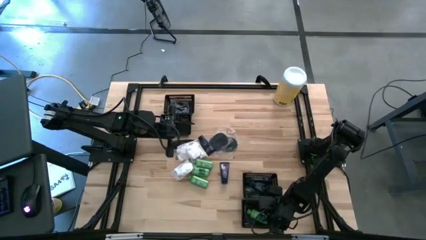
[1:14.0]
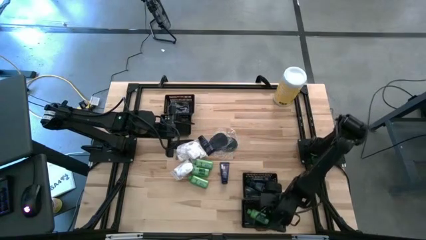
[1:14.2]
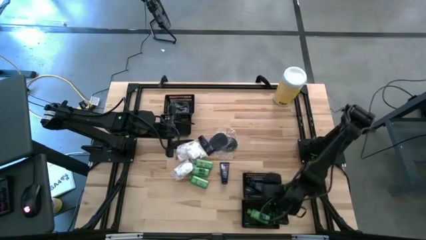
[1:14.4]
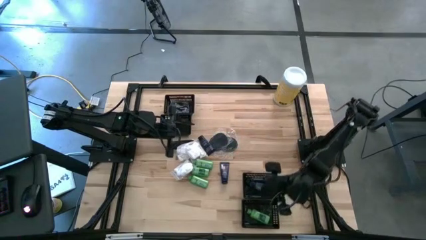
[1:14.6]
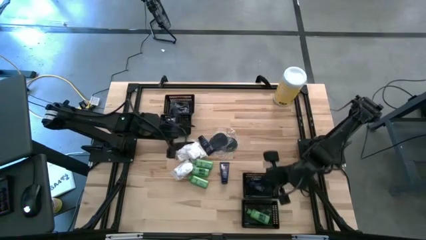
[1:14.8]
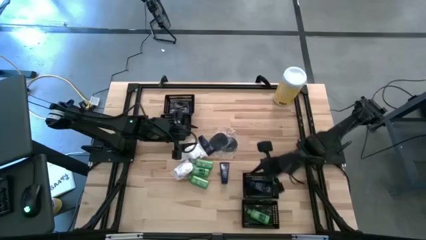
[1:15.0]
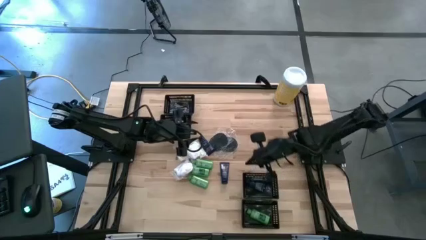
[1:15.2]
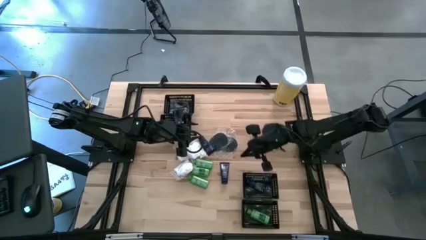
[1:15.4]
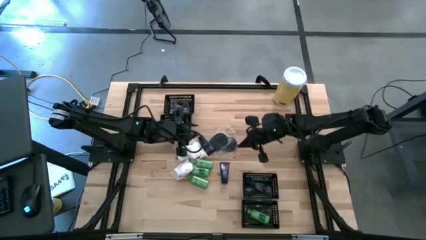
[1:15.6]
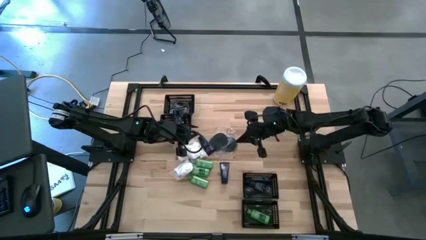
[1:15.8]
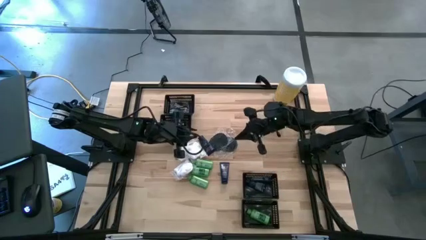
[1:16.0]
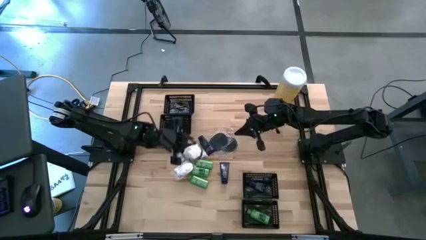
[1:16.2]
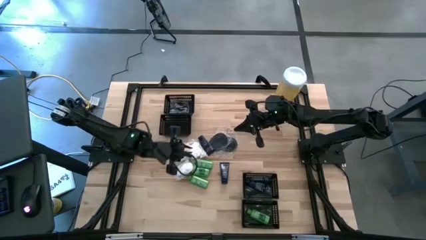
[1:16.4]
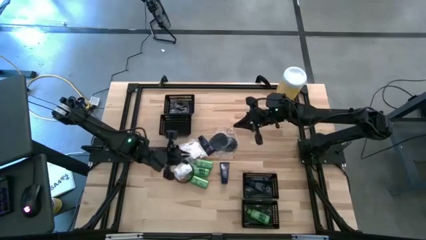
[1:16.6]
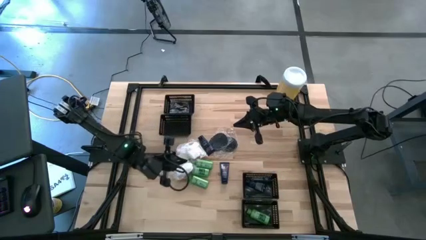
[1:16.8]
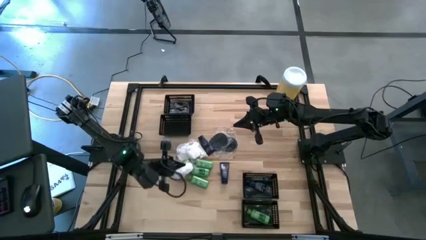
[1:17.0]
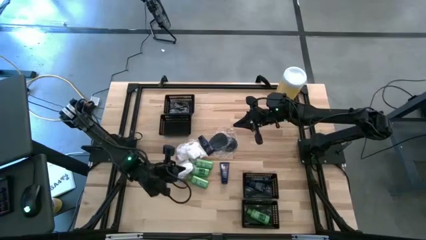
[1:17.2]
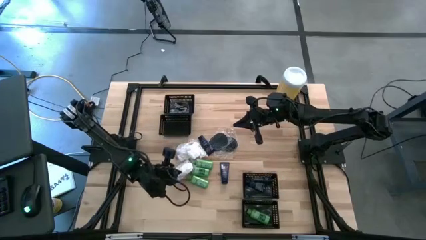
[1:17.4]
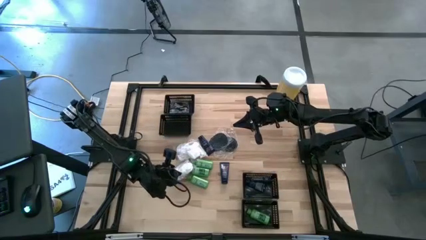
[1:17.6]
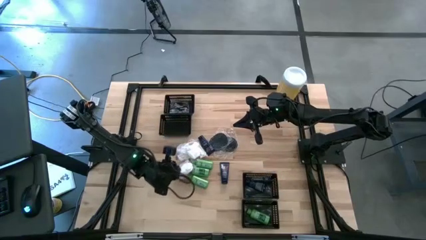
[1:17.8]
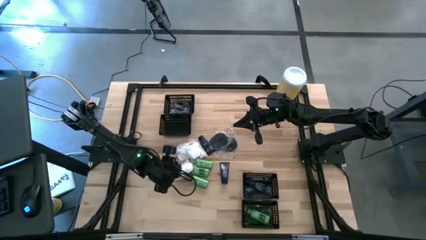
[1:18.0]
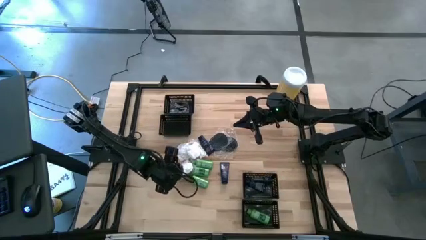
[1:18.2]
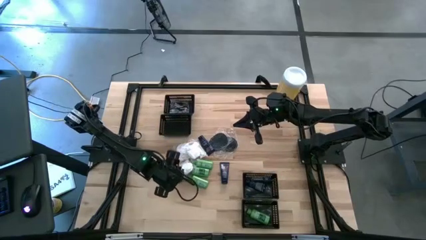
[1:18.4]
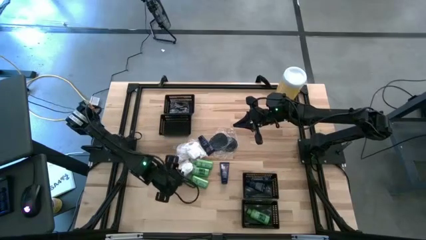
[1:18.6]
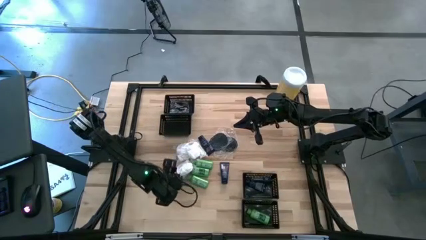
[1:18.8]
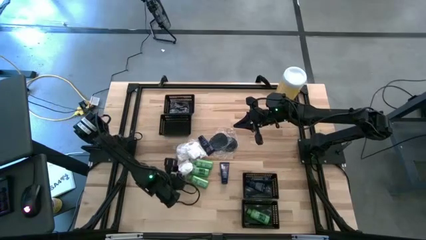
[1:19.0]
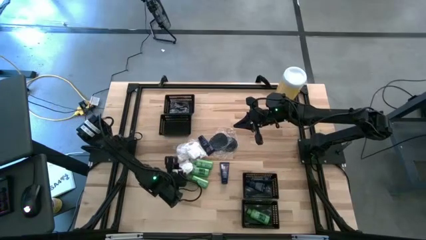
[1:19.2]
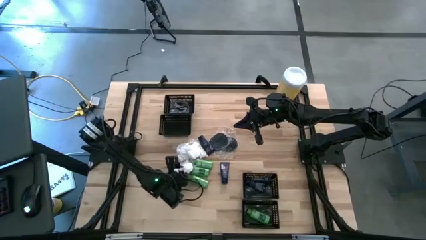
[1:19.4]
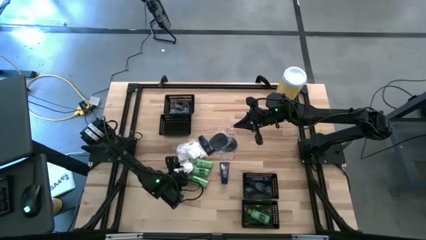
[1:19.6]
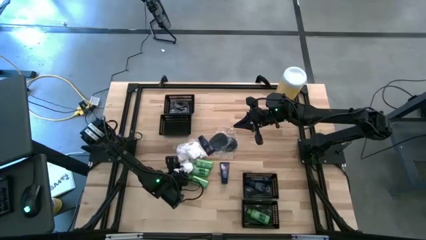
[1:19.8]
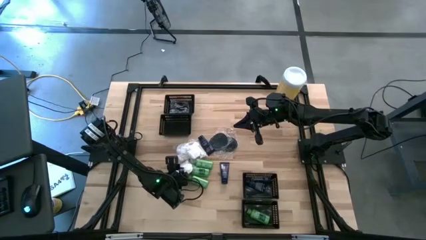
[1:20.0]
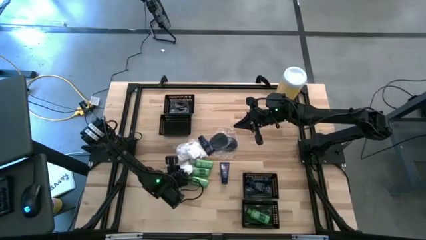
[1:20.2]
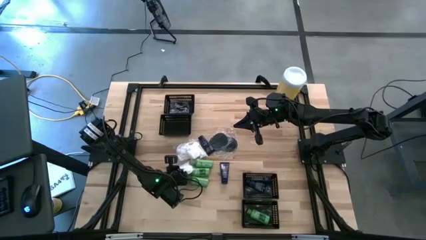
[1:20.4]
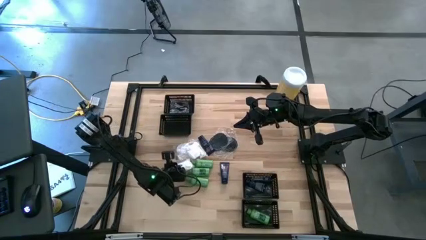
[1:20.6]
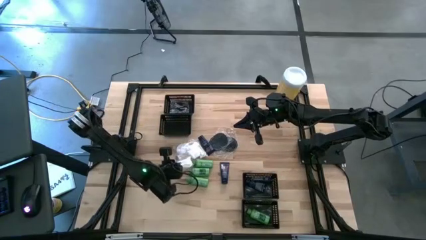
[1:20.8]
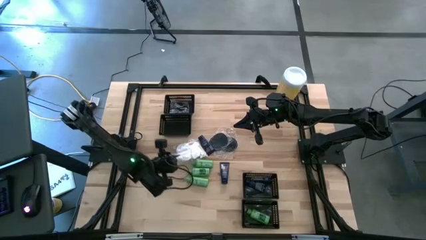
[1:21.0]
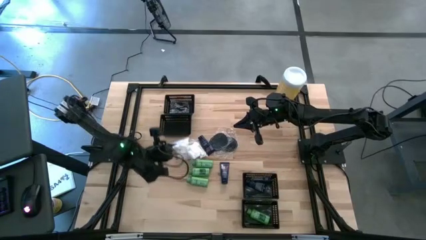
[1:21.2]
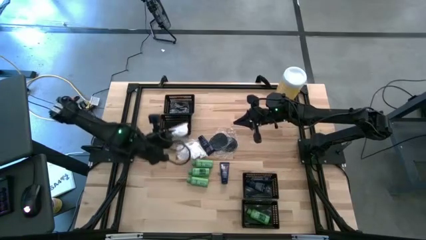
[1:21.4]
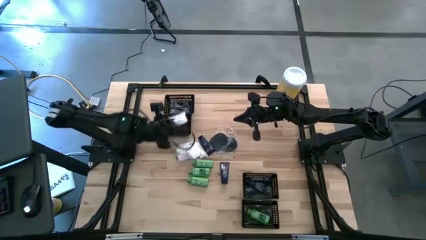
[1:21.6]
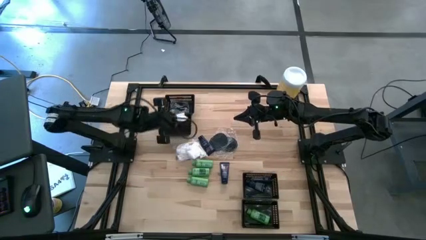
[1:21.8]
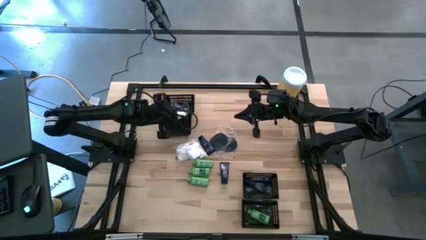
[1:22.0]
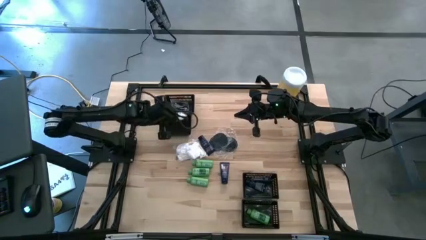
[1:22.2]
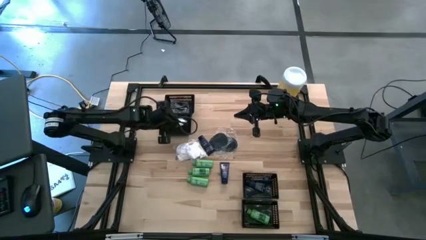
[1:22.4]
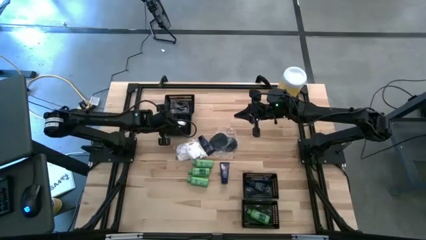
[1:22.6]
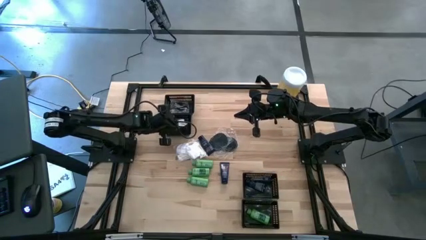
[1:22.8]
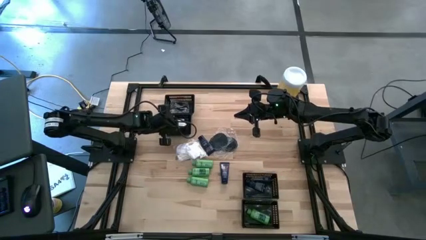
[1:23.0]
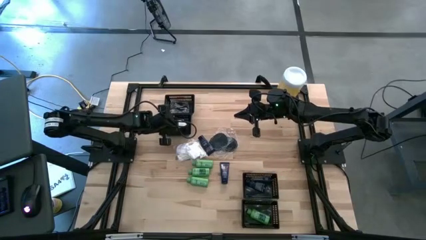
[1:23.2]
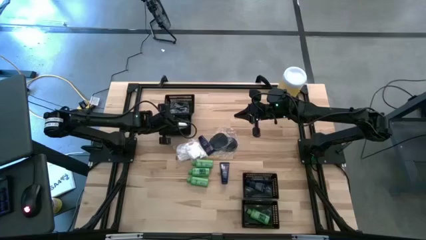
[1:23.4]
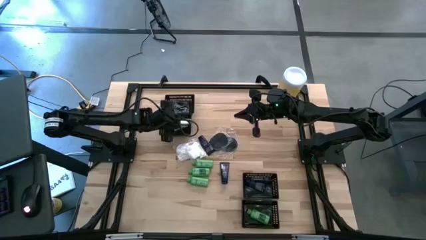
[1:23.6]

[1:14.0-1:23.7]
Task: Pick & Place Travel size toiletries
Put the white cotton pack into the middle top black basket
